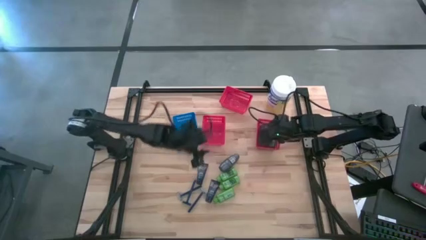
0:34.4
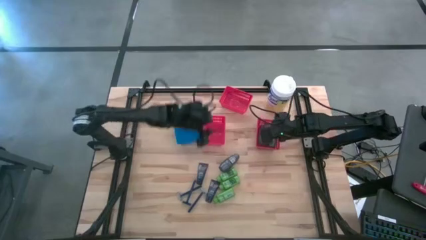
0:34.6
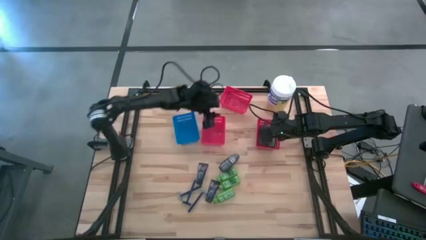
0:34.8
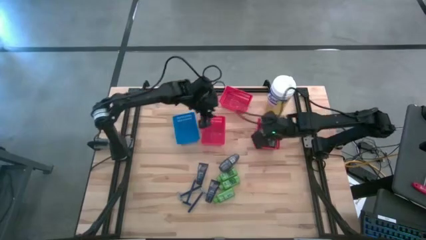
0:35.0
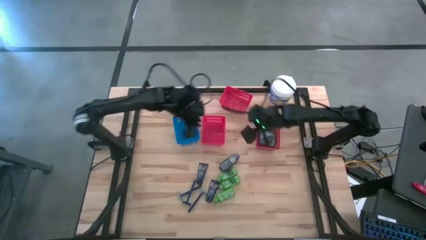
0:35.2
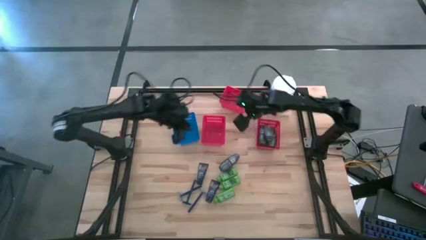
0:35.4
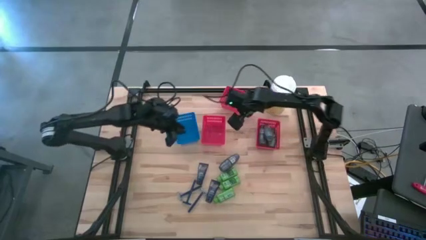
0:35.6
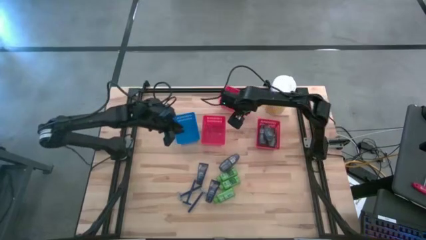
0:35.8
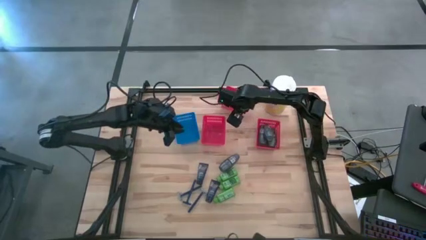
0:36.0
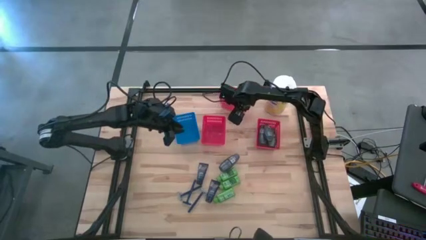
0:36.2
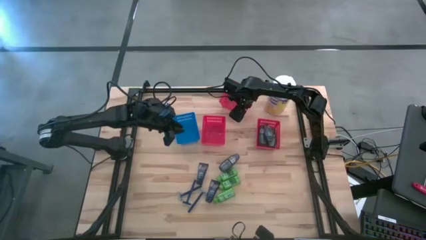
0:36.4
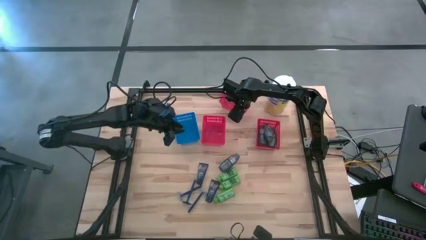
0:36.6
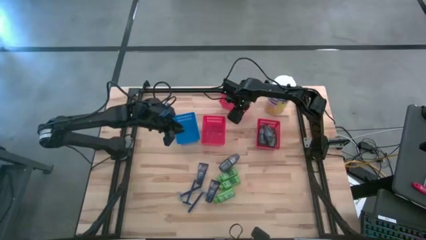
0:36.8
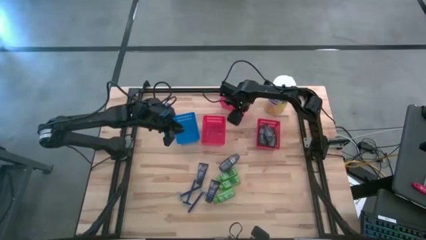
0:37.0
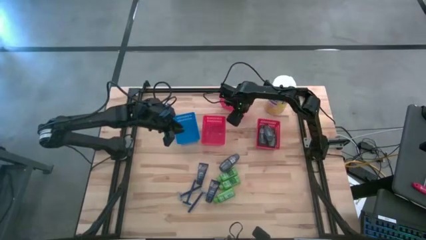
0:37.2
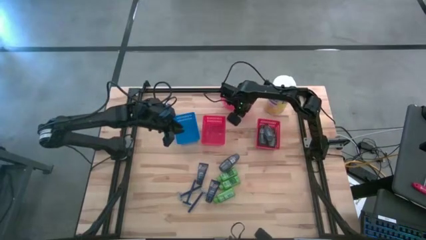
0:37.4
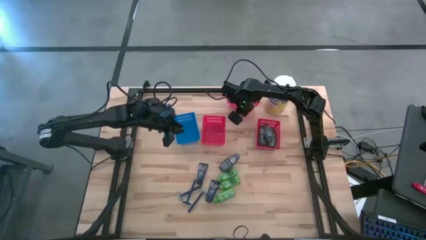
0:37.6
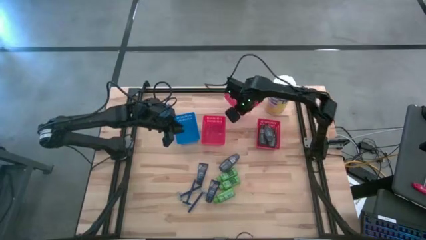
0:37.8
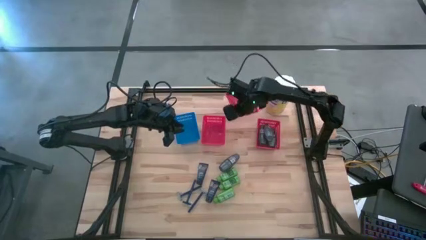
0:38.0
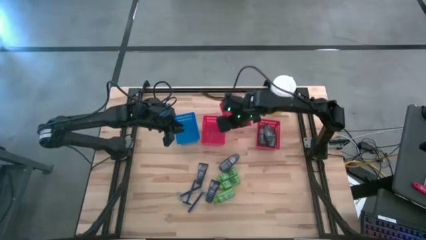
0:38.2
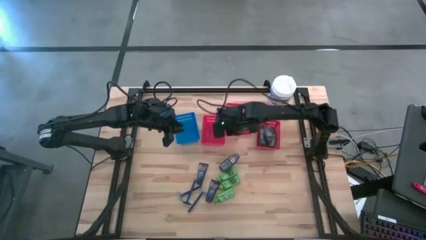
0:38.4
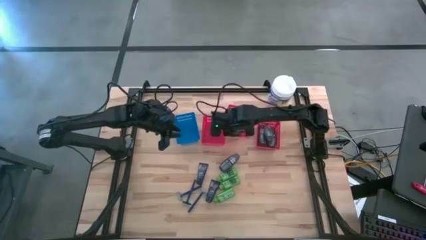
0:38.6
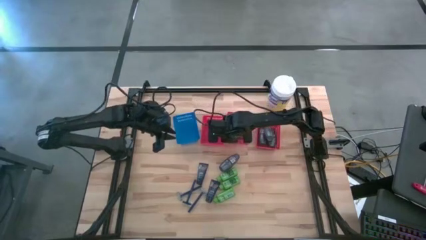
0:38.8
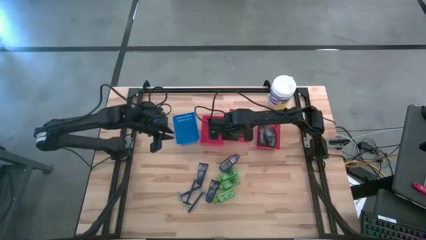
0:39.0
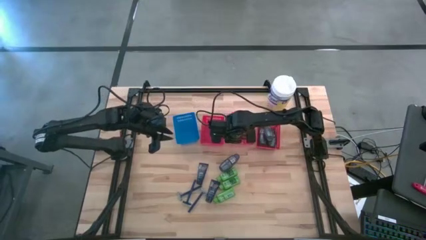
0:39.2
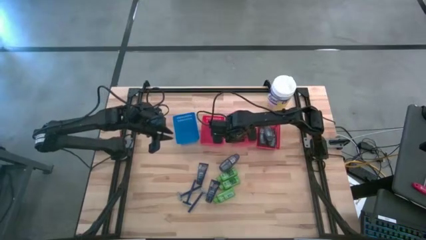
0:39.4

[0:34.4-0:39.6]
Task: Pick & Place Travel size toiletries
Move the red bin from the top to the middle of the red bins

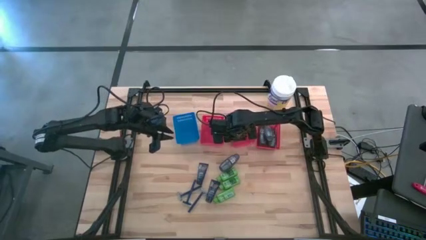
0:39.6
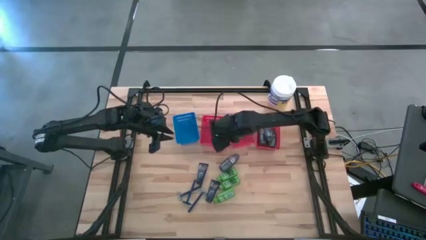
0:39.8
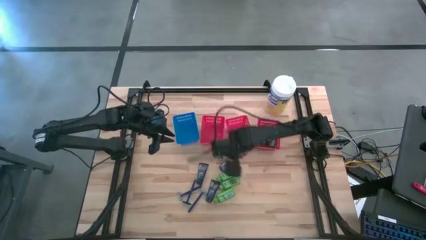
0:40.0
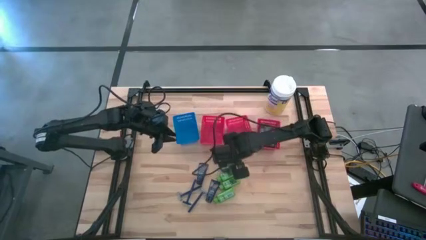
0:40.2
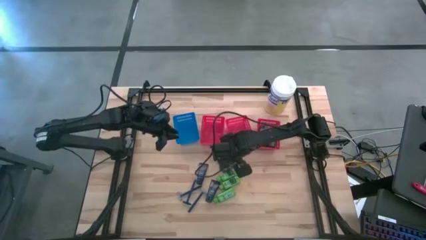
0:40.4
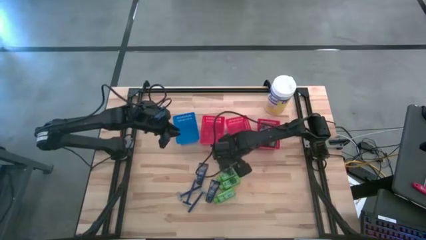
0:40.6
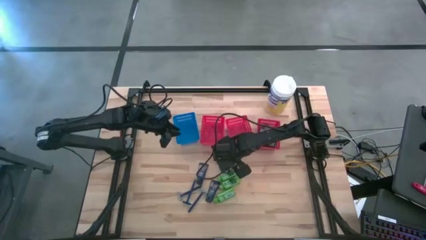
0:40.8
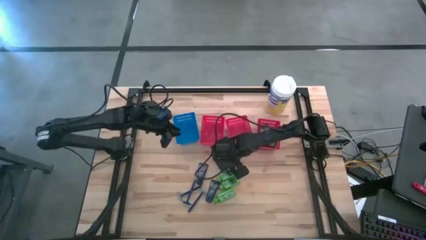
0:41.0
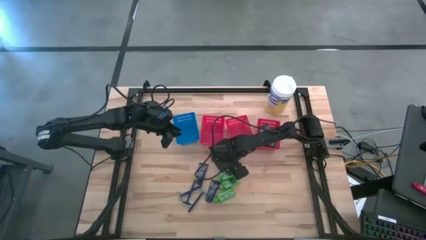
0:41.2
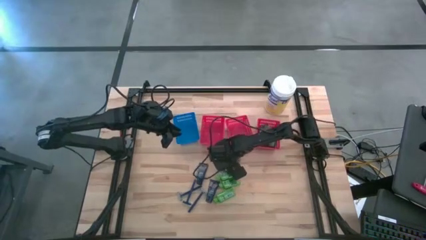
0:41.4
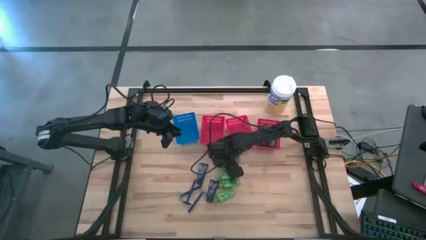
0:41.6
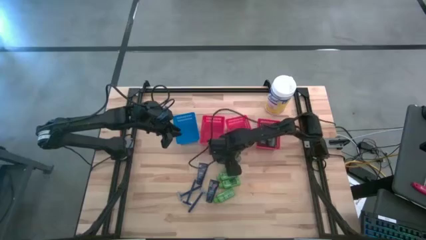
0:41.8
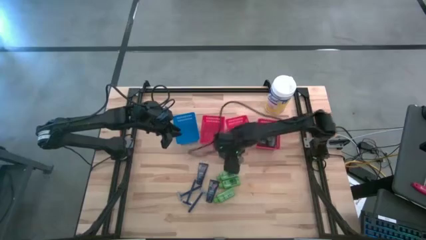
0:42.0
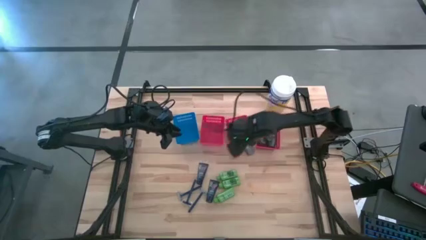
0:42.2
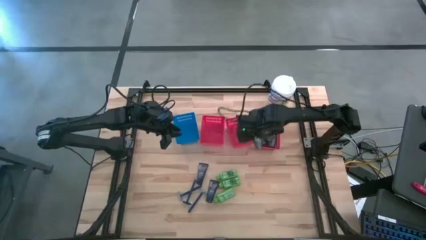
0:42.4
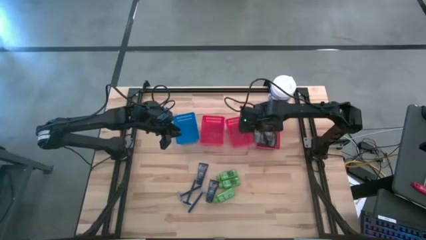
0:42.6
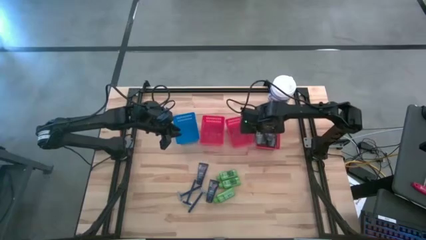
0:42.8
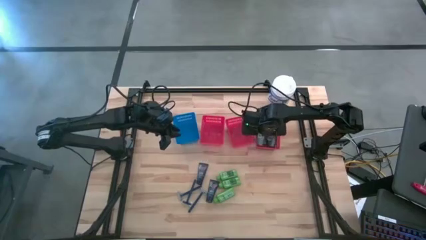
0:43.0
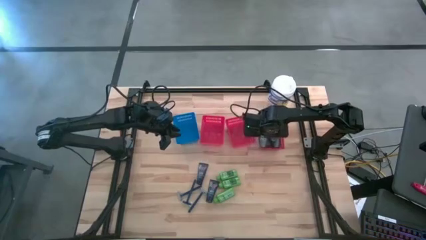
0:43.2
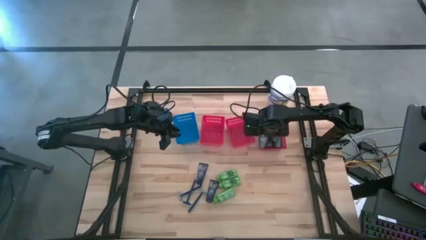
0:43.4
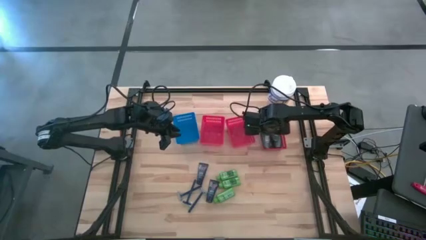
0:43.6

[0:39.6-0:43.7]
Put the deodorant into the right red bin

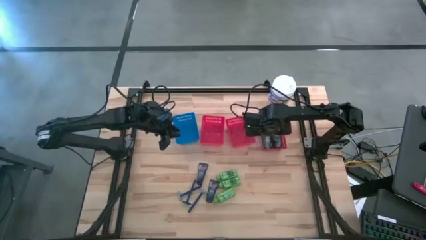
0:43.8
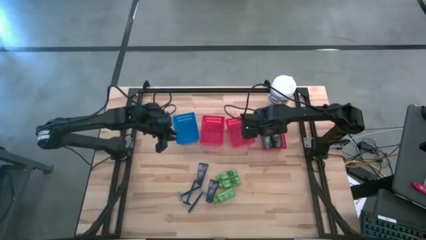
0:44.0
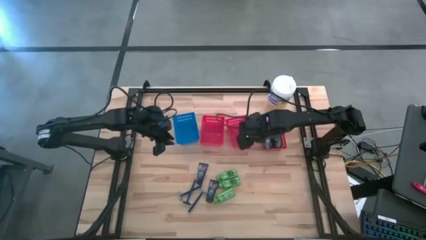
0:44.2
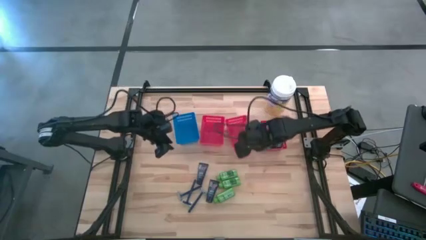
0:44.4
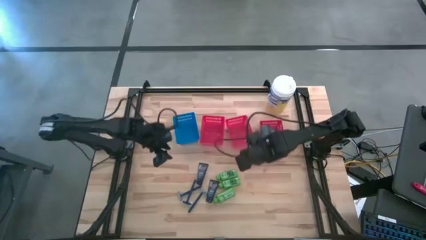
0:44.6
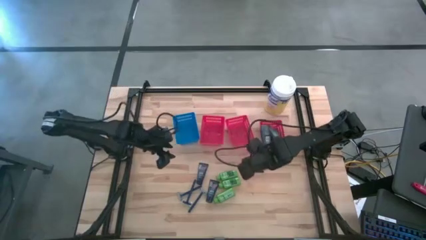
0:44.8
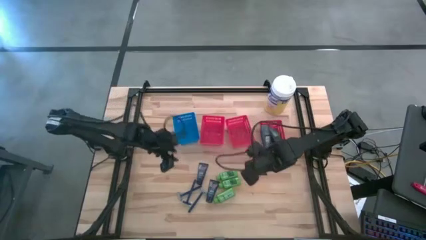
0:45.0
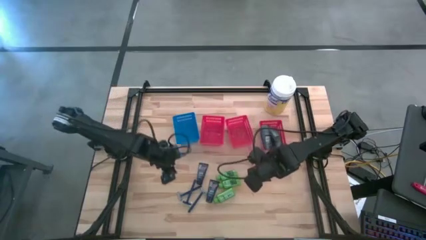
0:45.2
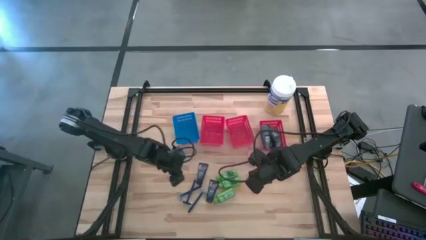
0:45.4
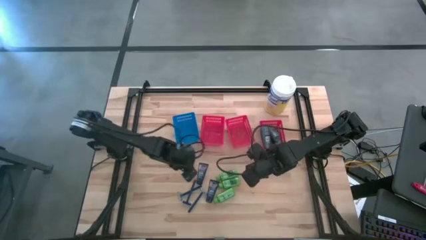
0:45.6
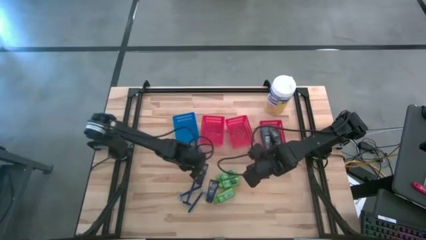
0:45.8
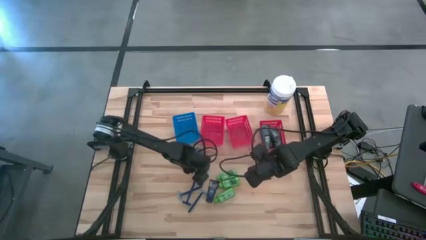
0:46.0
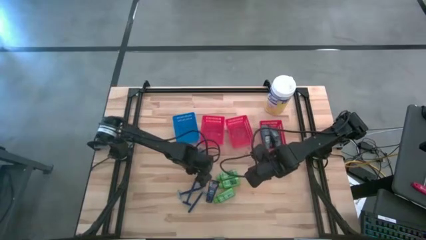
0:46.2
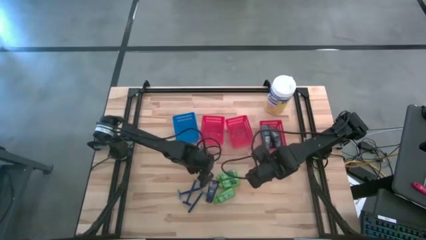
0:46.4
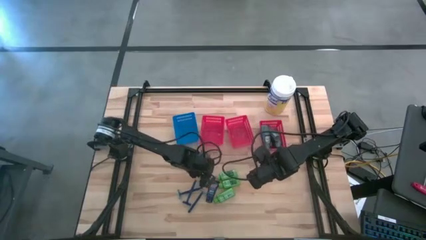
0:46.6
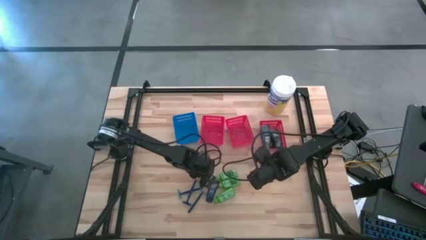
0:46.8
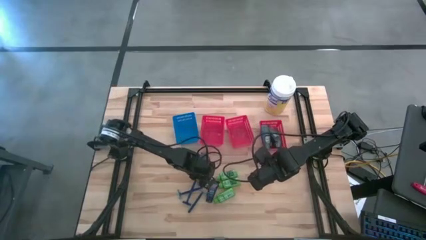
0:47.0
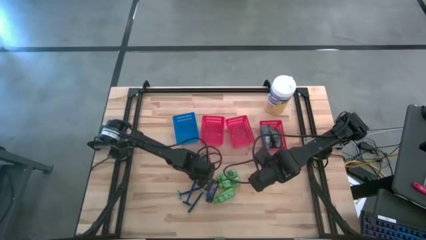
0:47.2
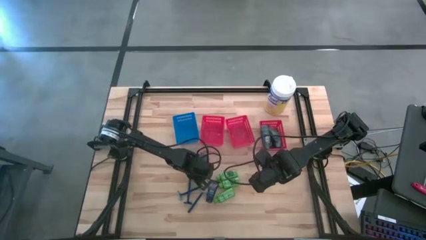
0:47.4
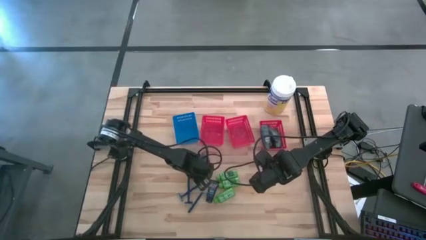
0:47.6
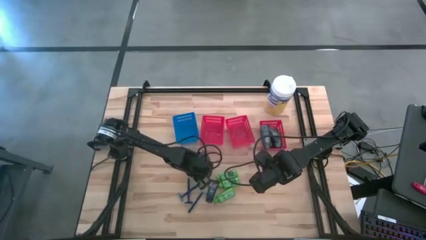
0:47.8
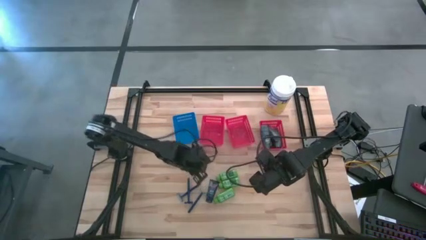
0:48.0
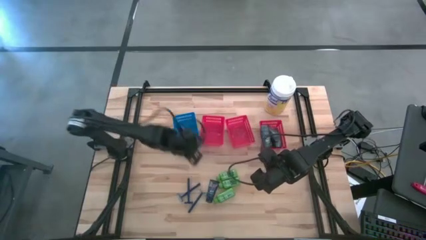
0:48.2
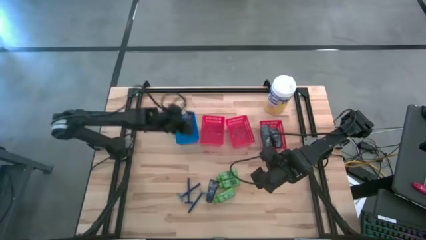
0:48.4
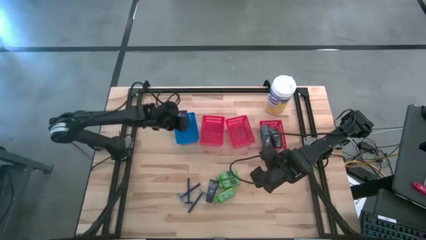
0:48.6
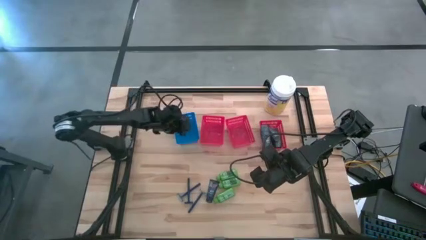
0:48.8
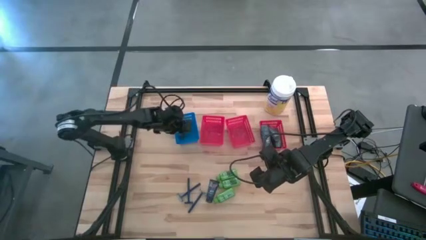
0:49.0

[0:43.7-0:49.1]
Put the shave cream into the blue bin

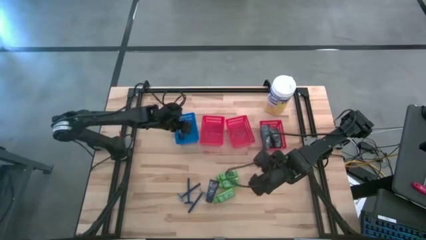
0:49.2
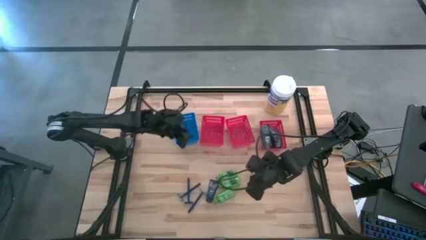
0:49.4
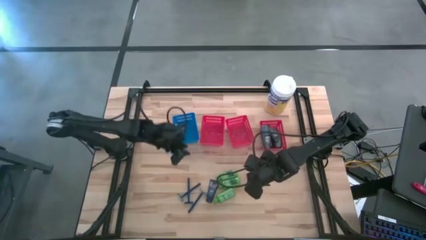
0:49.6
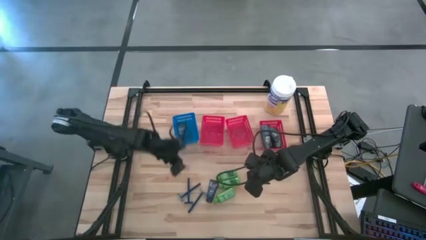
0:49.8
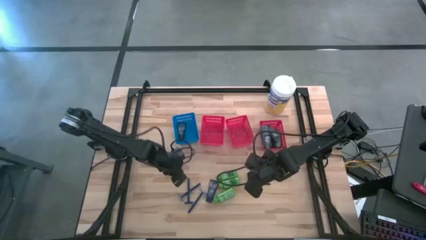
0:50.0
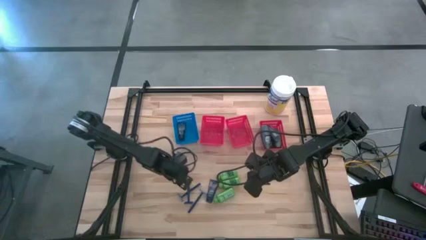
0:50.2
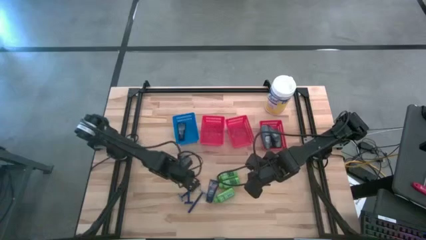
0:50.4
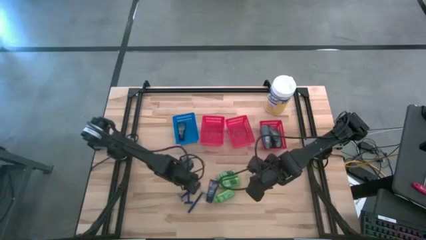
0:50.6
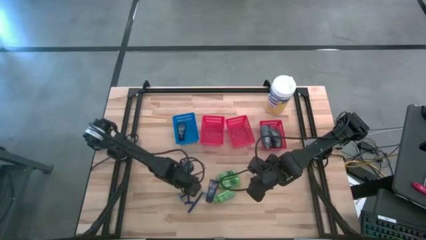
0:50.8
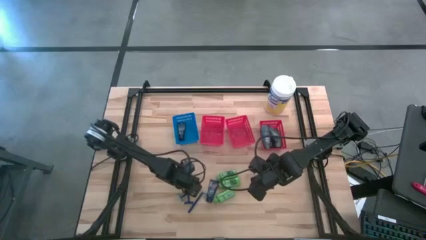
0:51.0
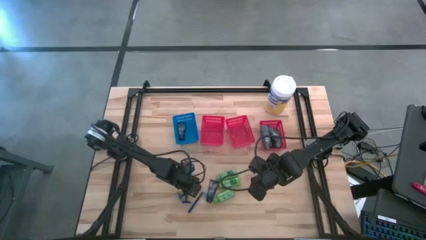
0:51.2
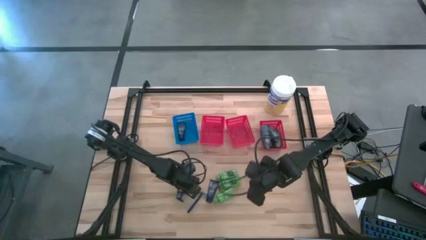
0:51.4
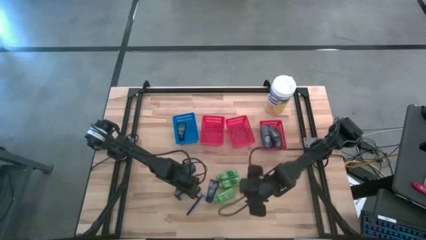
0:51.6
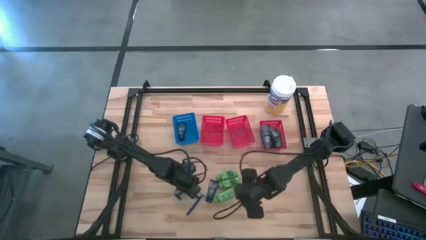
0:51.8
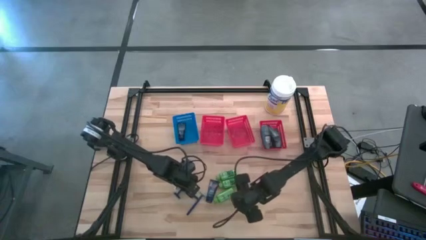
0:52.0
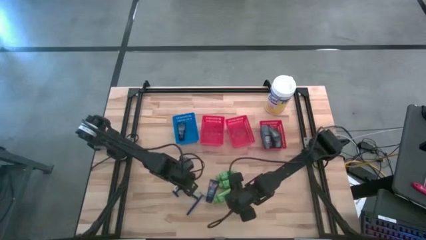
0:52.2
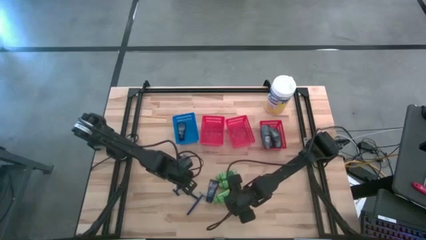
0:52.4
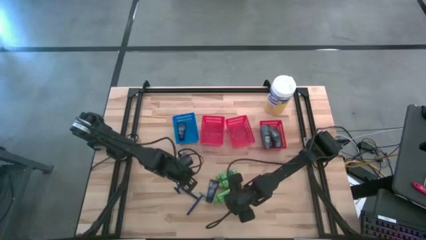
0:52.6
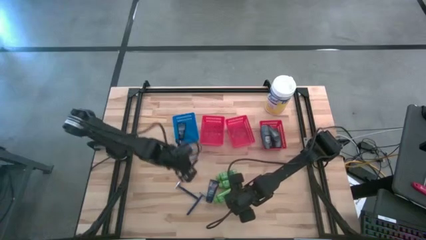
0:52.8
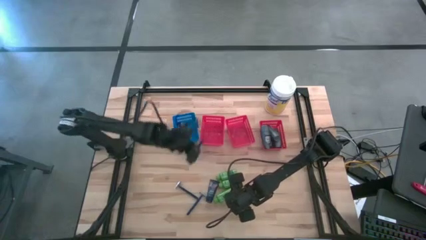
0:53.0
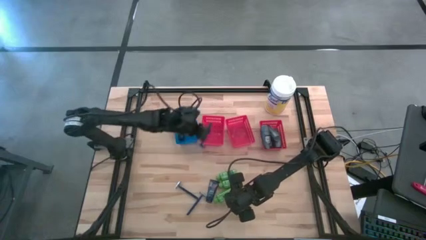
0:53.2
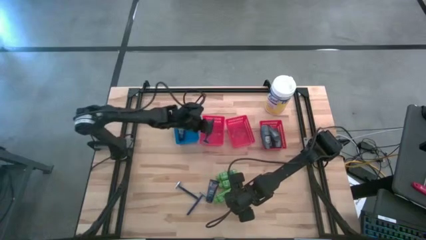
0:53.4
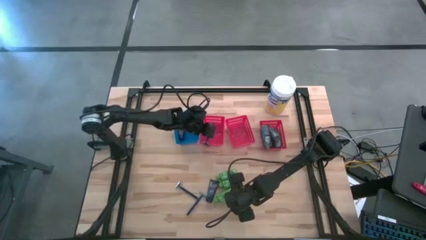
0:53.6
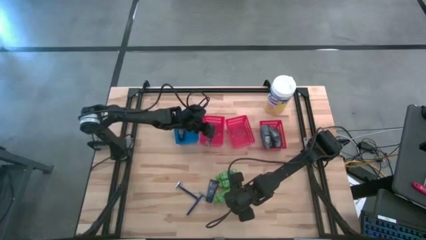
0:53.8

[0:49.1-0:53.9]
Put the razor into the left red bin
